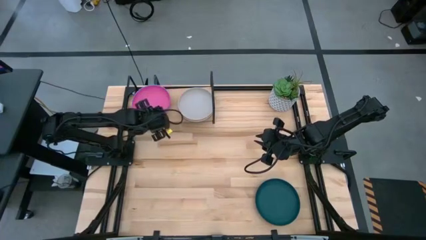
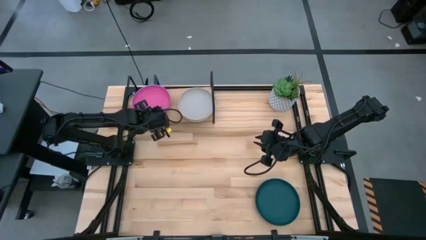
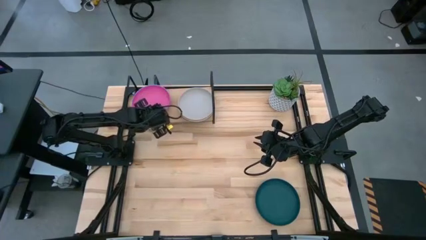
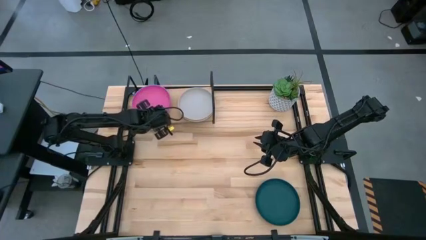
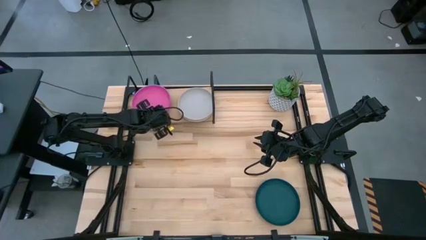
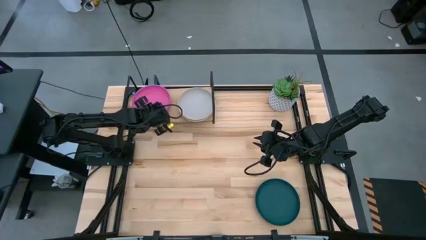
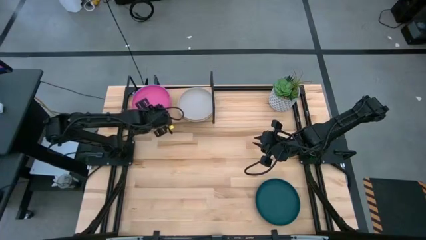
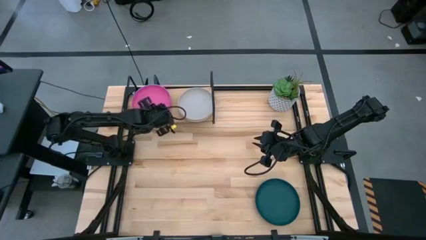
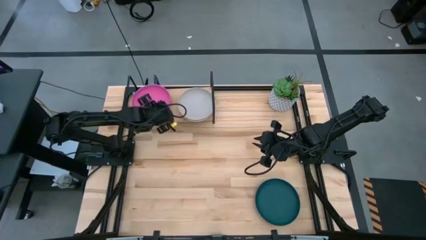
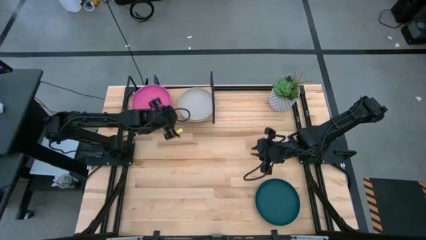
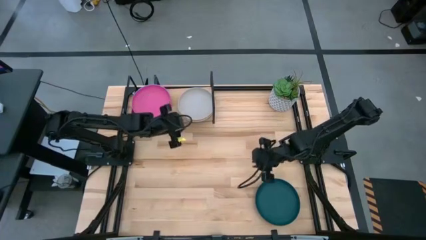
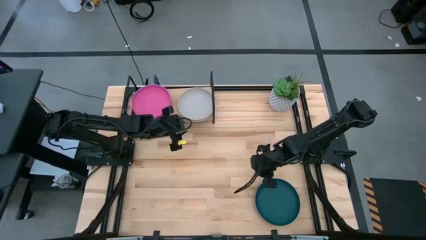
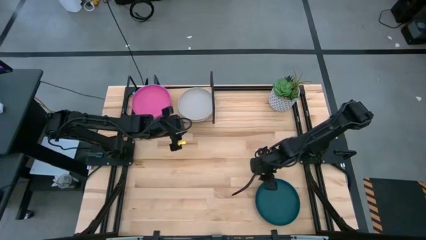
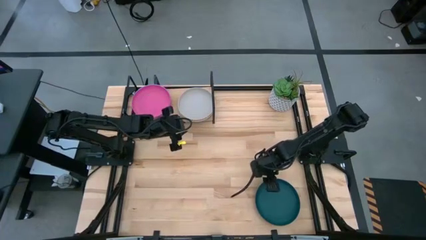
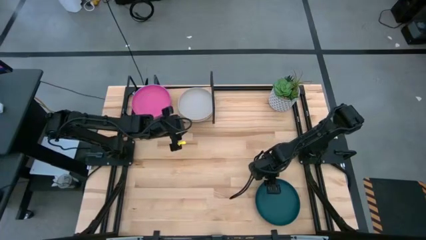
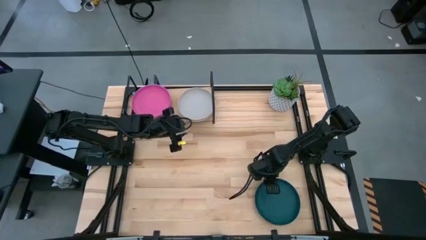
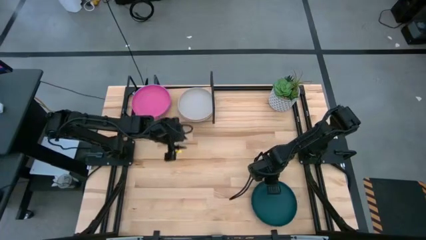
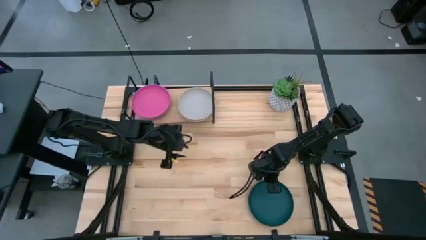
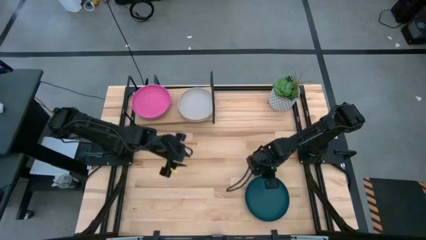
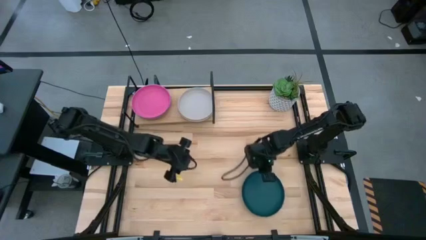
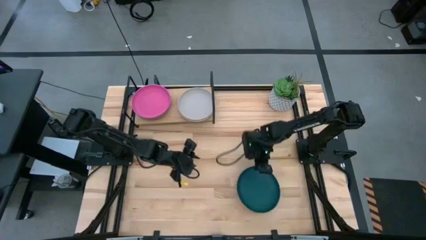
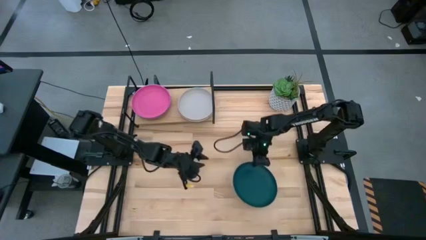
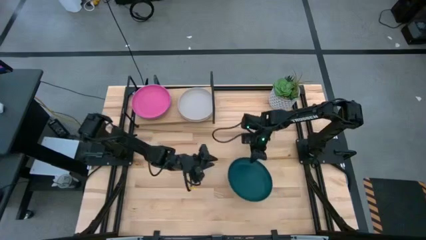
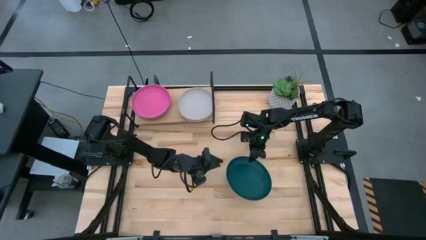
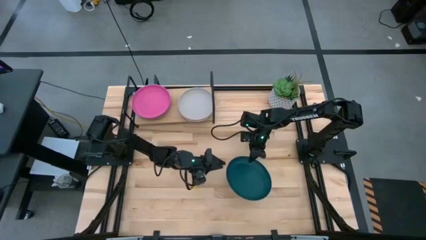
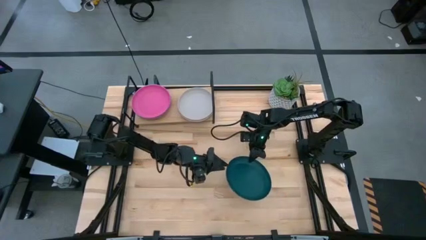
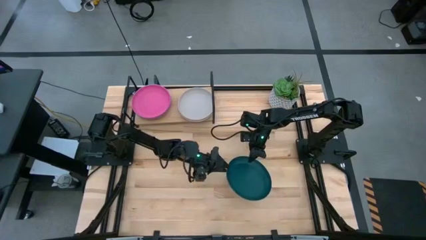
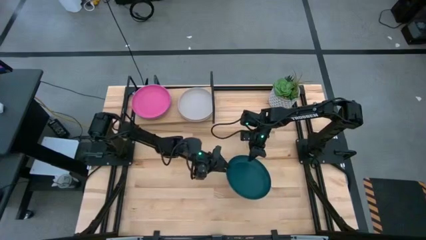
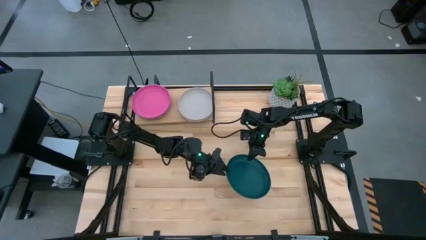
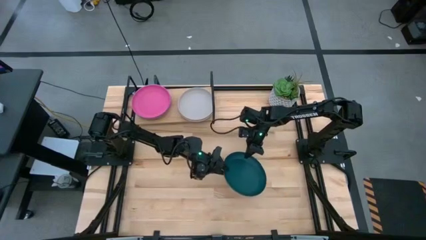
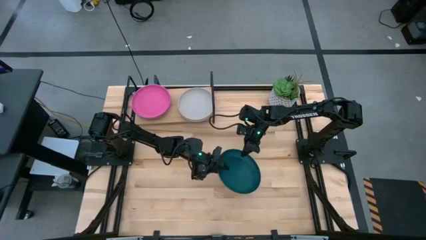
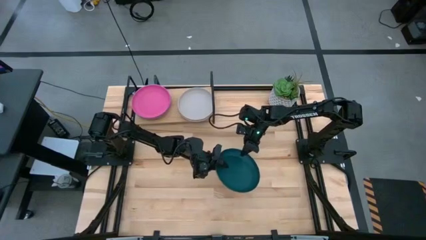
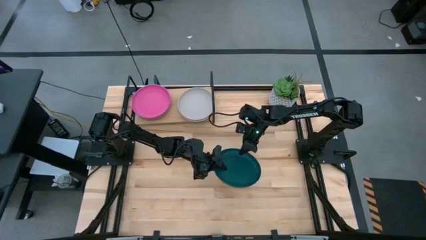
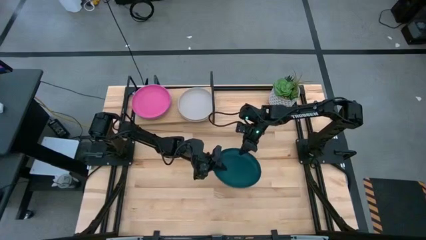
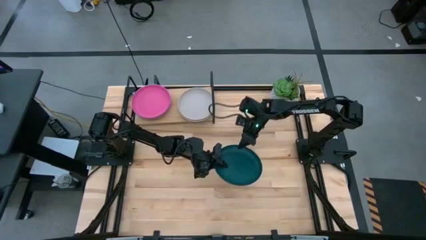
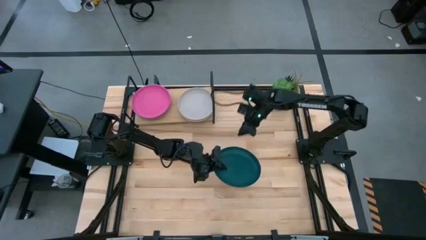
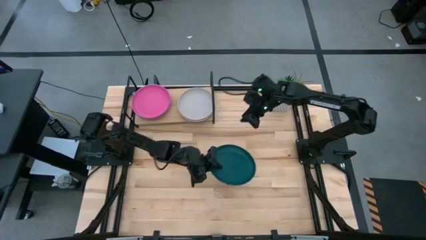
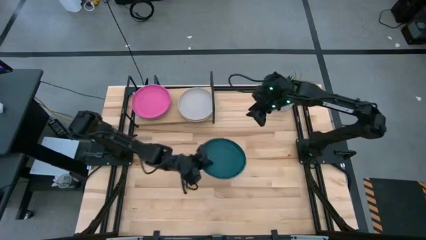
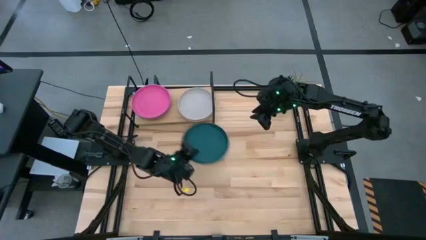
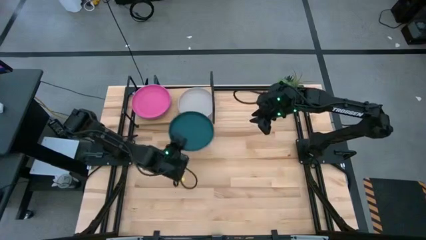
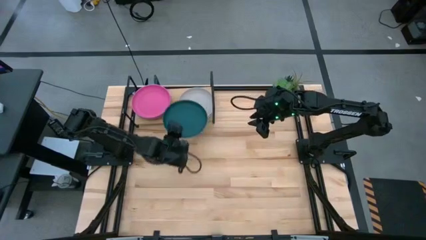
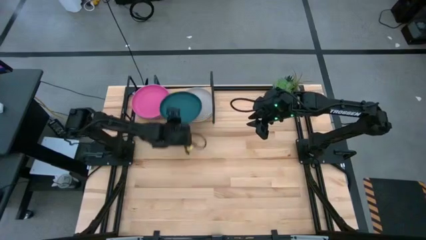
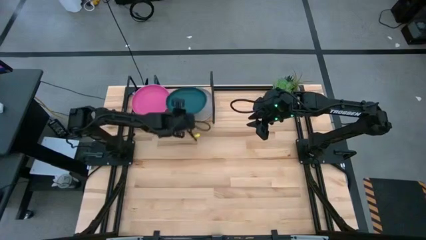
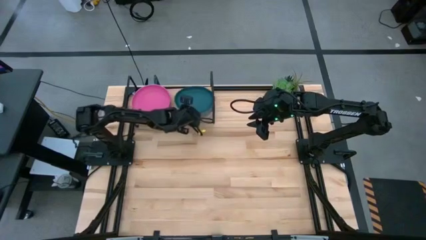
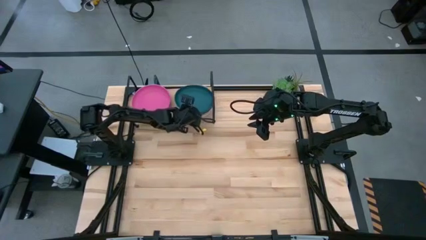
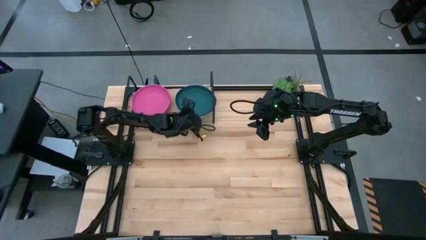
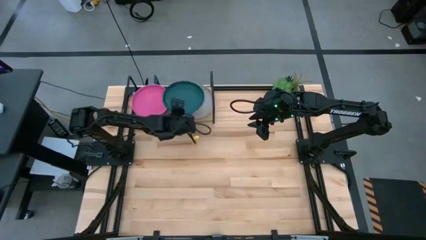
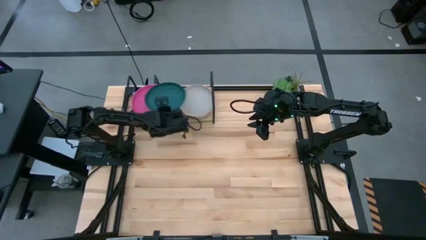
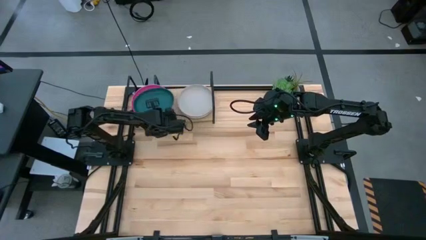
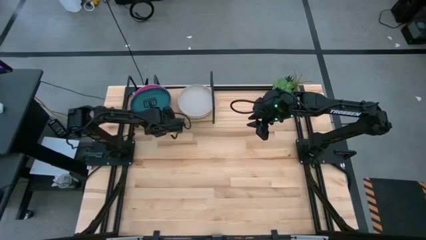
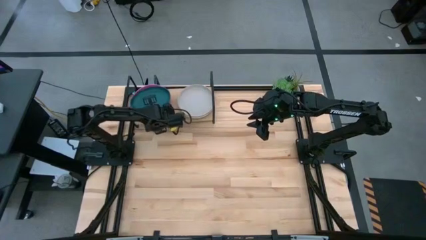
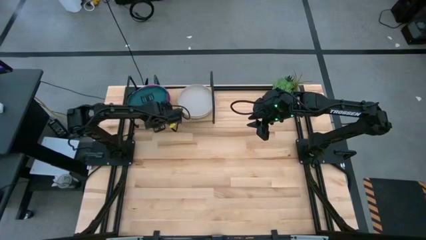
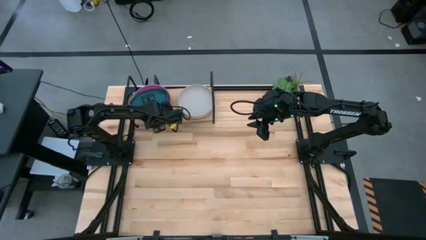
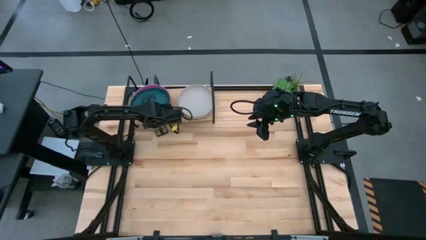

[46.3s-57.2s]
Task: Place and stack plates onto a shelf
Stack the green plate on top of the pink plate on the shelf

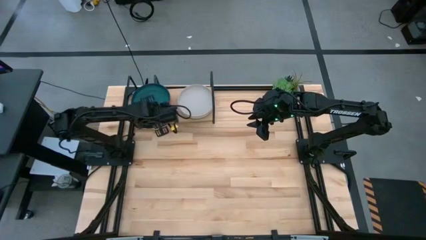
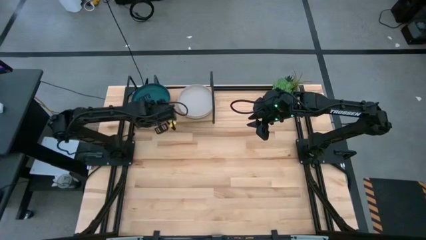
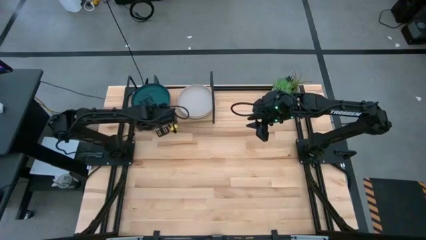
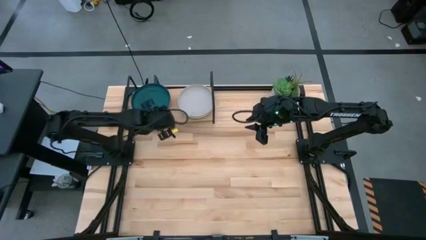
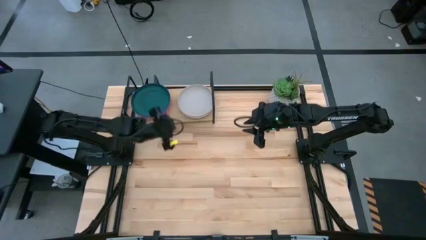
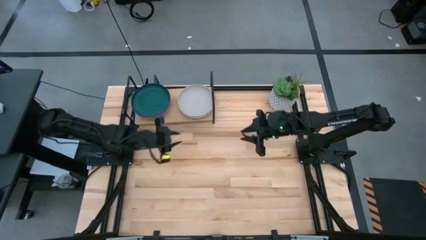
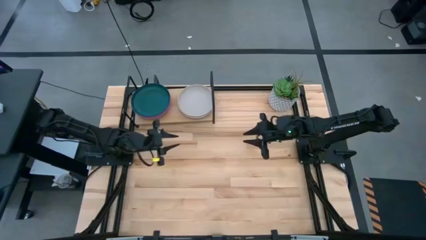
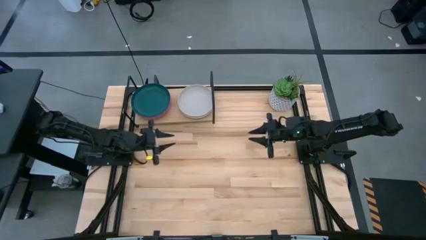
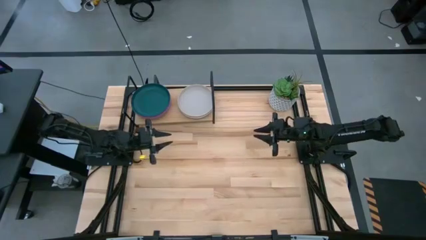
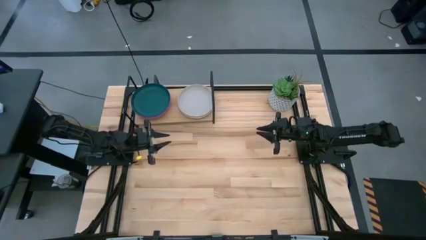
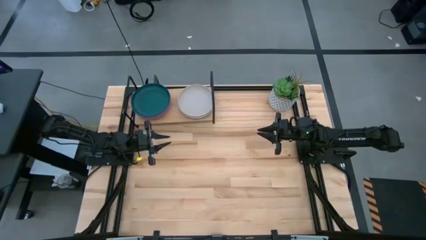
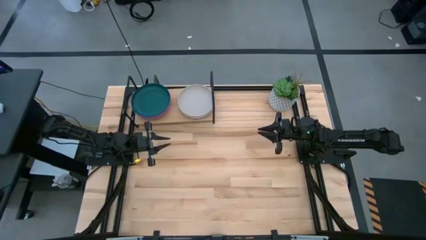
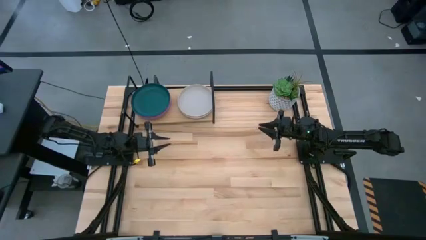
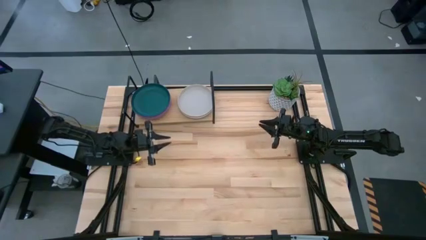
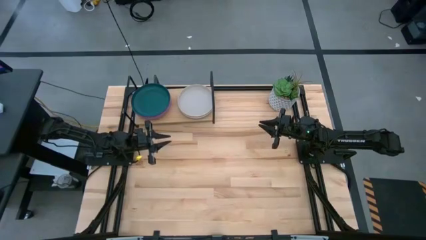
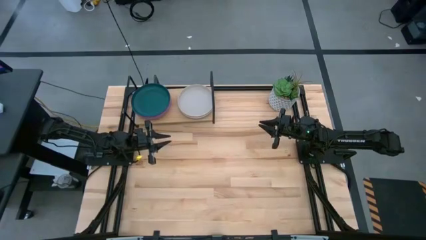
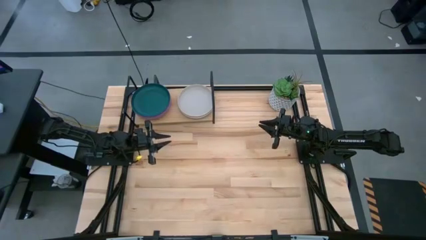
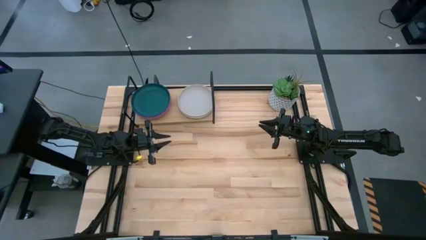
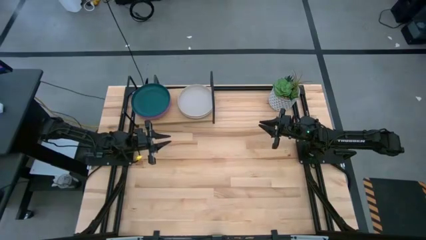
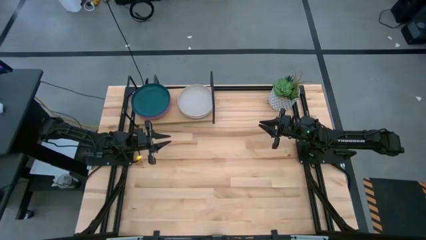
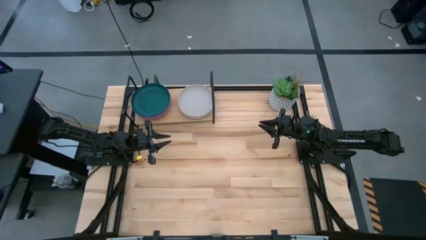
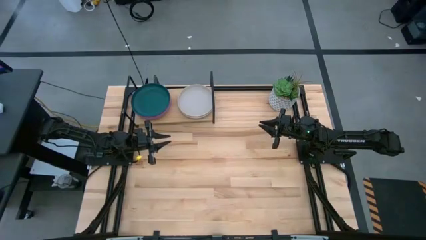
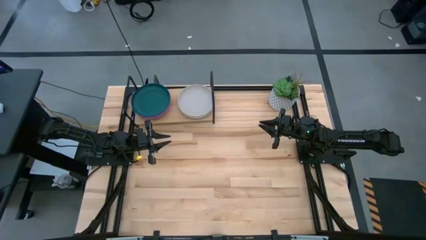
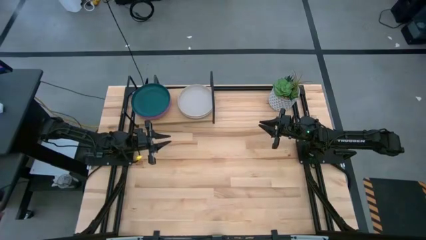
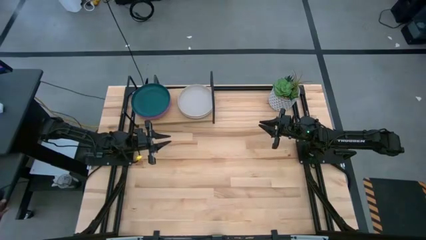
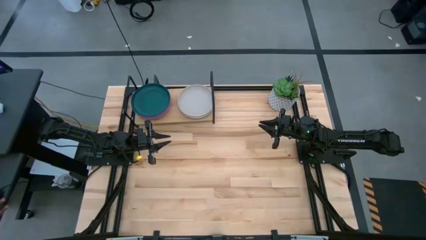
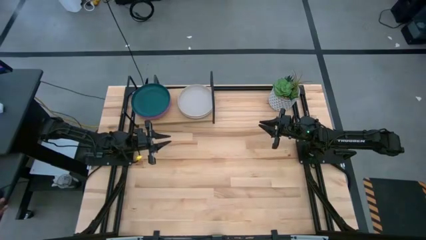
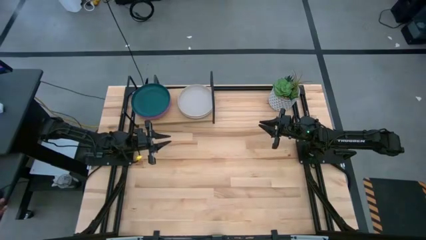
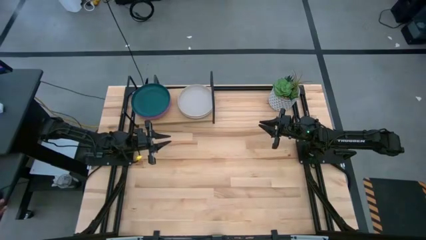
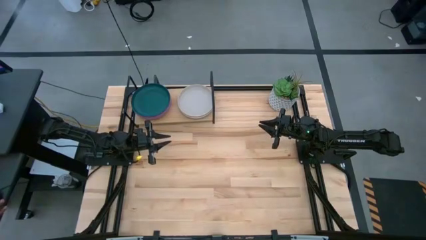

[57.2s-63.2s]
Return to Home Position
